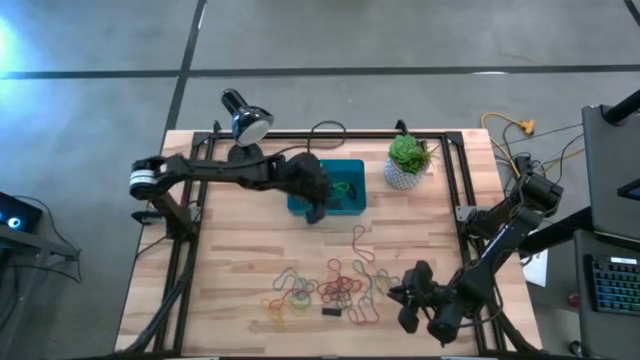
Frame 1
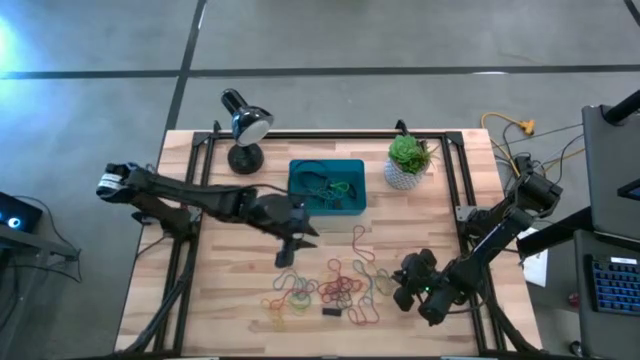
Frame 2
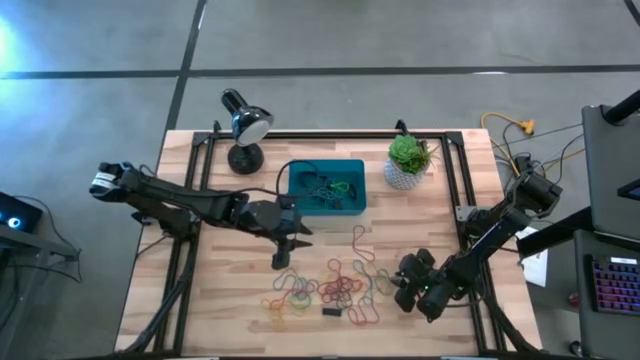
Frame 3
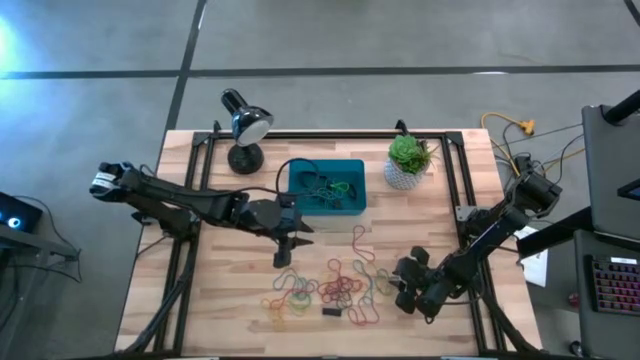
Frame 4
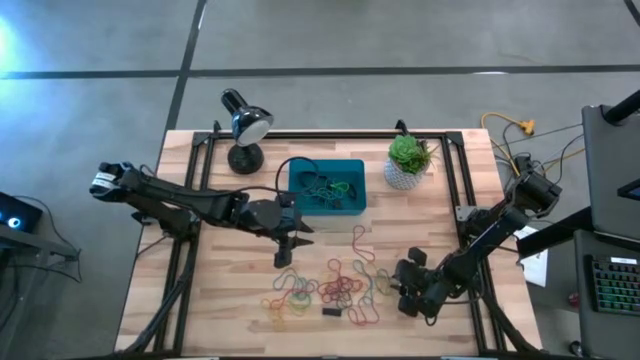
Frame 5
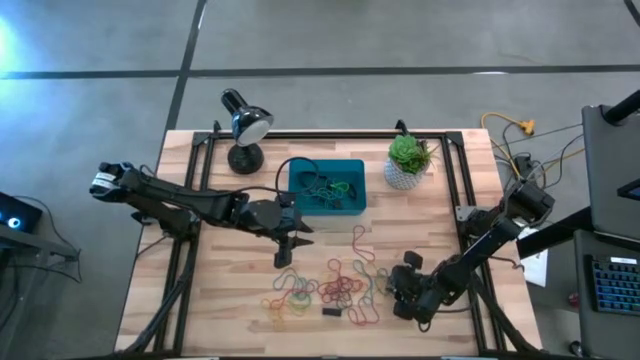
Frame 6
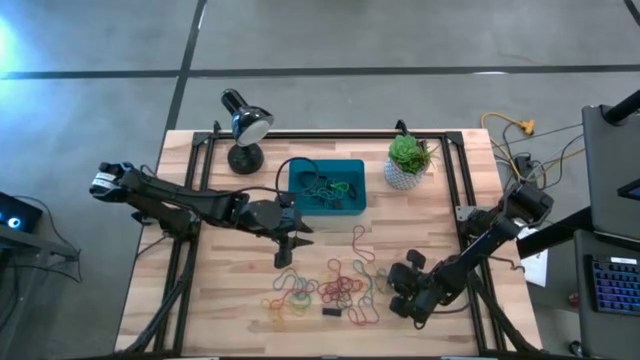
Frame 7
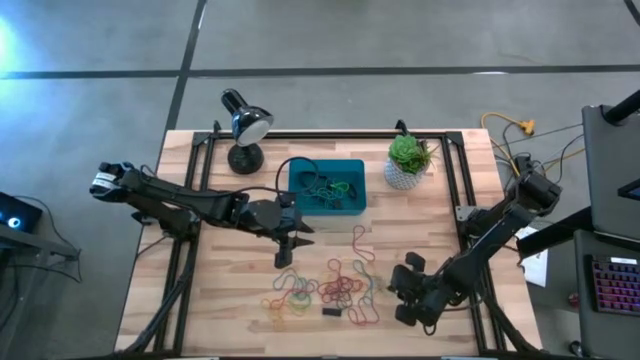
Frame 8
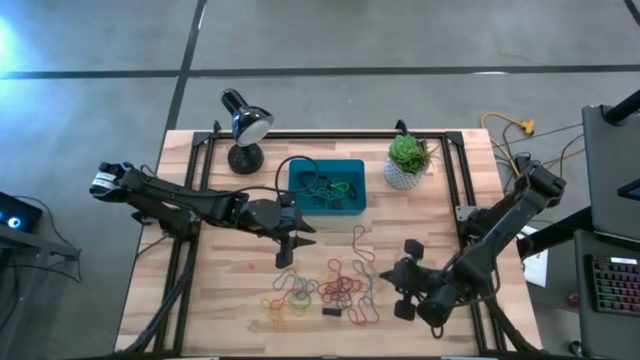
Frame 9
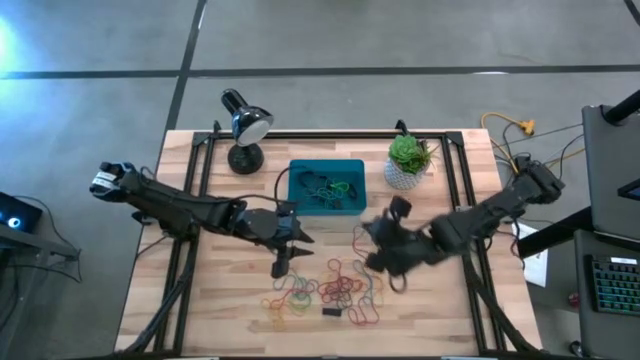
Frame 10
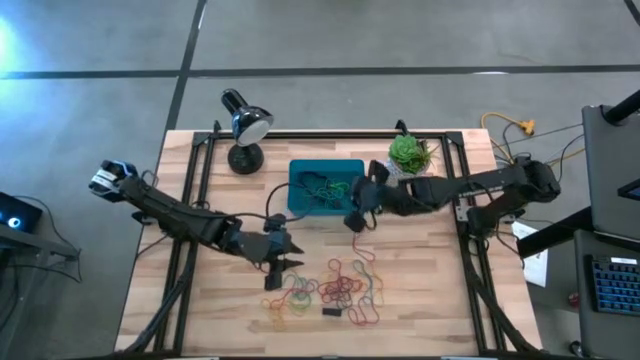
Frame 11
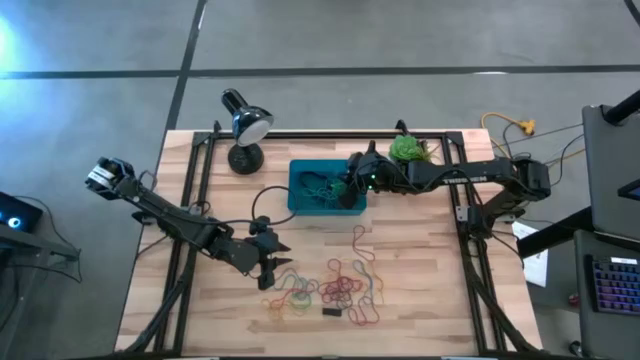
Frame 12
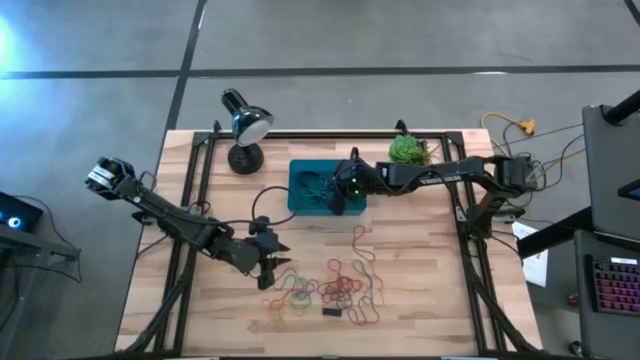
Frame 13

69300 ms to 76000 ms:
Task: Pick and place rubber bands into bin
Put the blue rubber band into the blue transparent bin

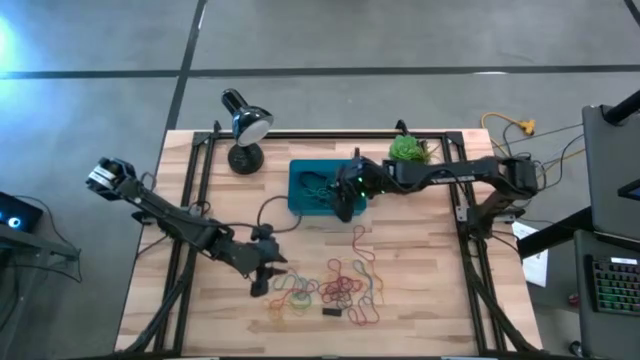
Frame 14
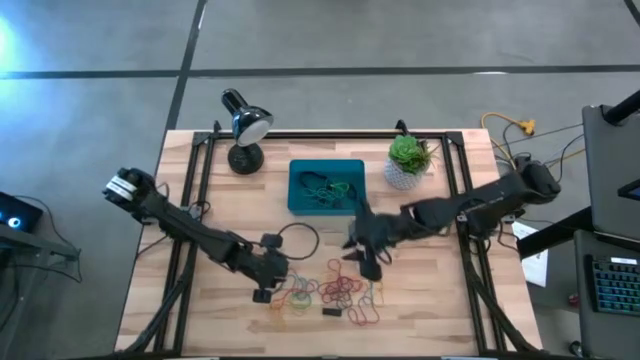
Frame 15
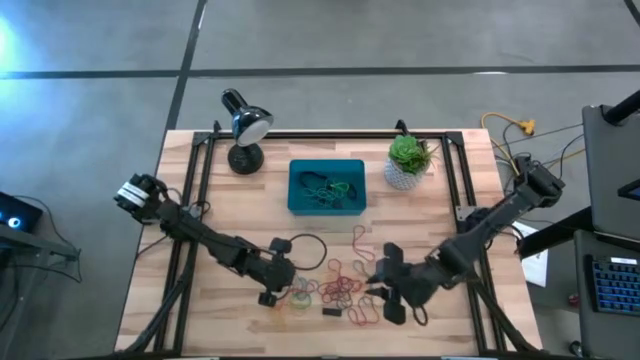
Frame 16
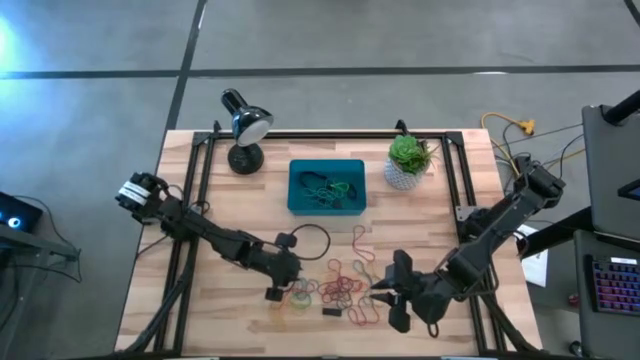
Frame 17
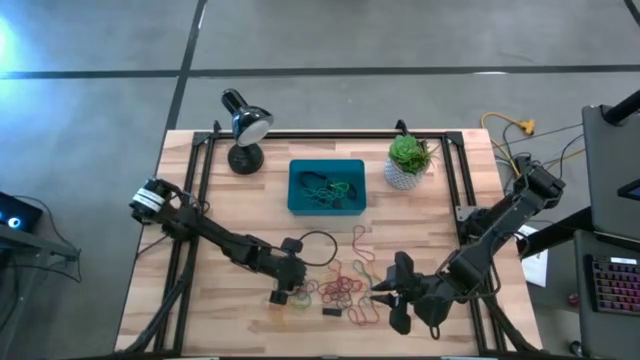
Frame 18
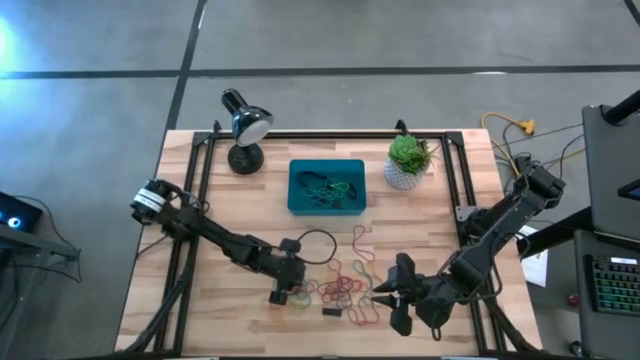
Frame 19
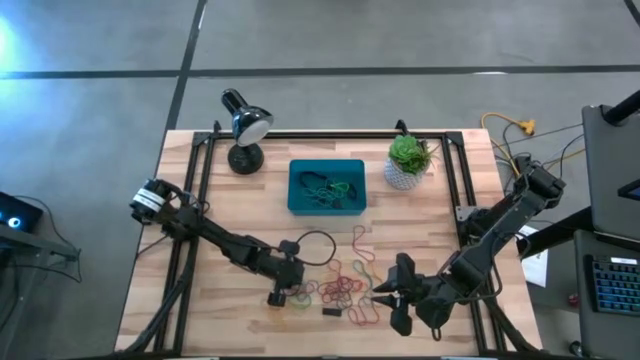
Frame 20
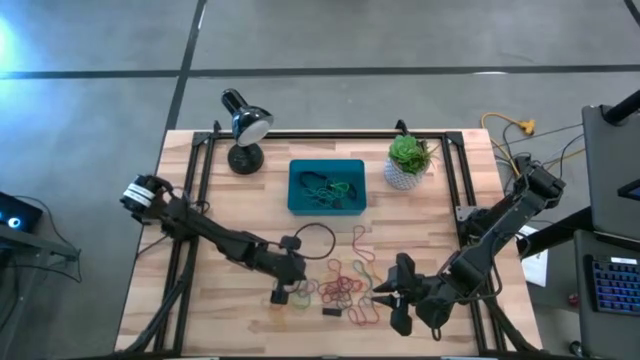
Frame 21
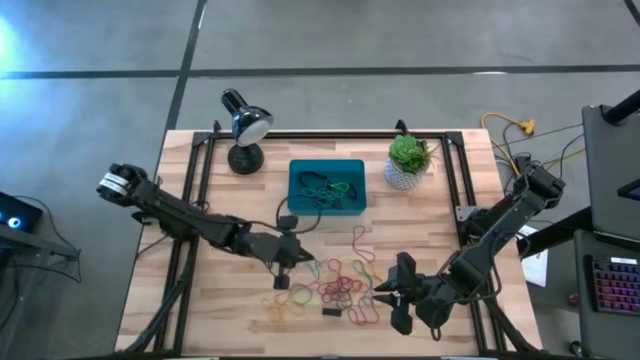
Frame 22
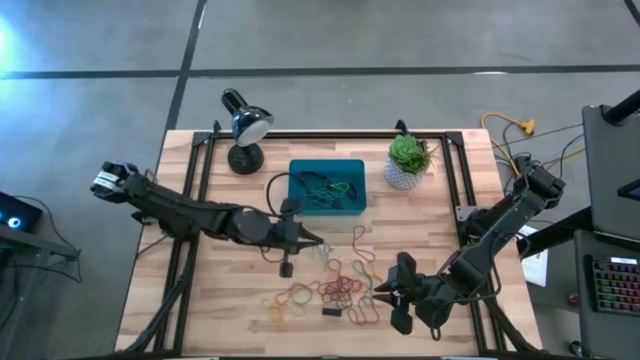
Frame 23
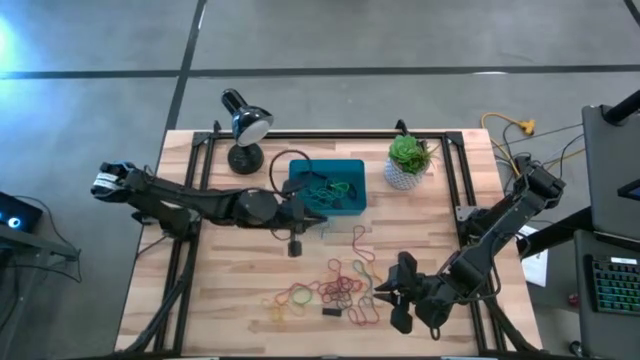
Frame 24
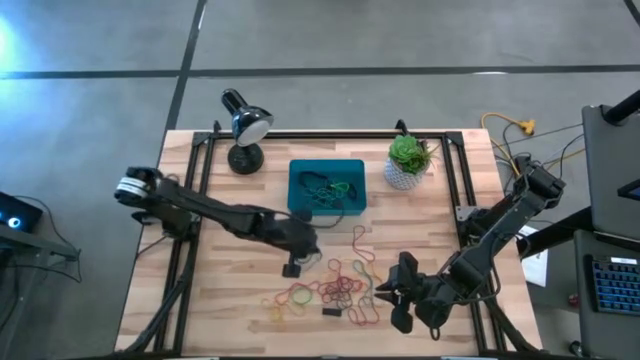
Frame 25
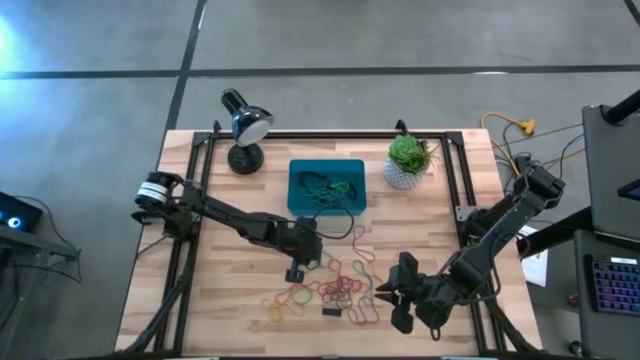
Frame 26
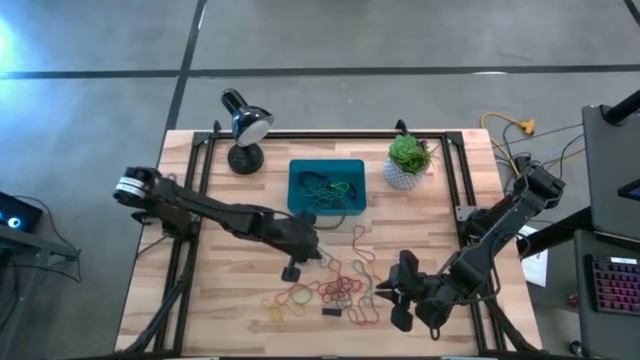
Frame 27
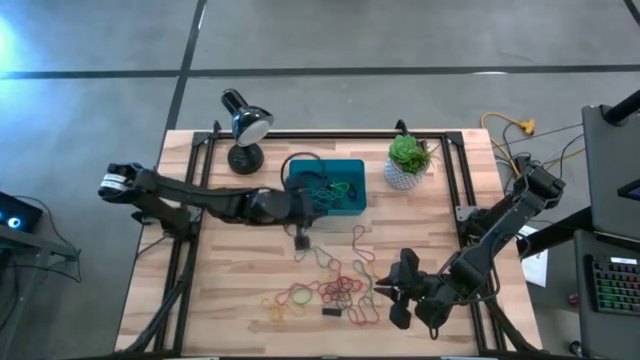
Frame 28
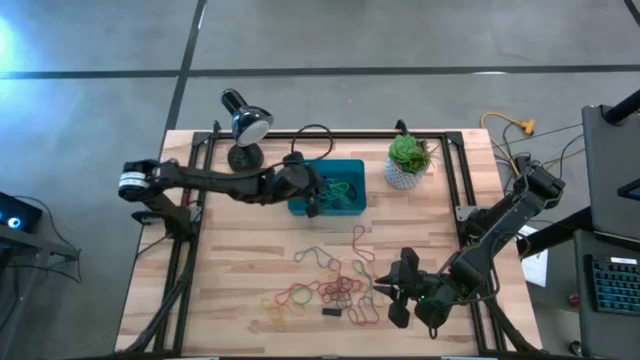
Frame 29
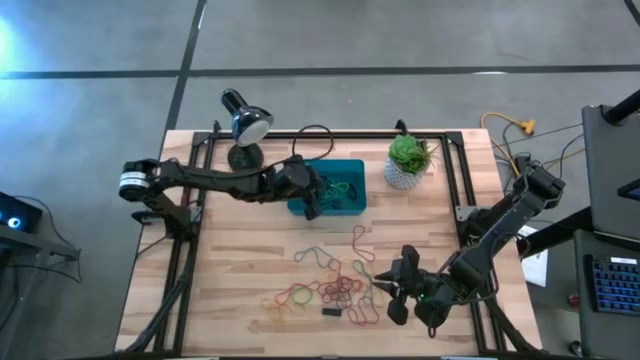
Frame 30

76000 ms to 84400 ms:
Put the right blue rubber band into the dark blue bin

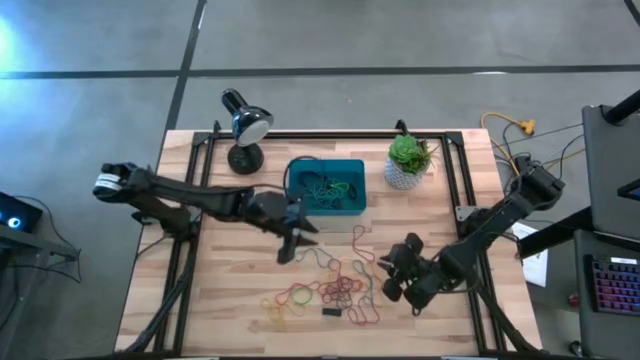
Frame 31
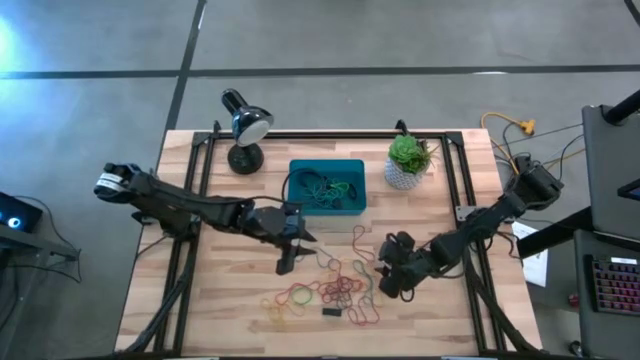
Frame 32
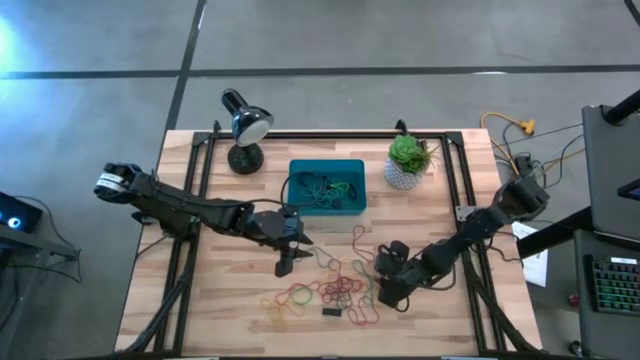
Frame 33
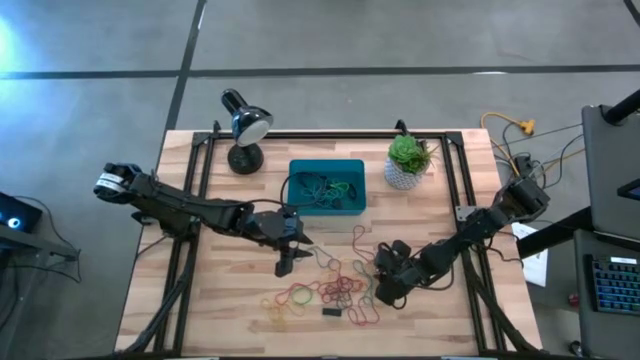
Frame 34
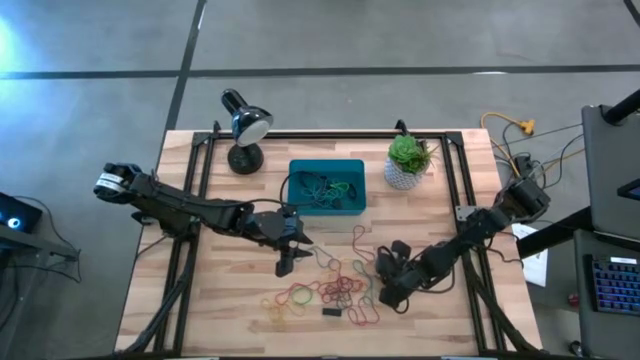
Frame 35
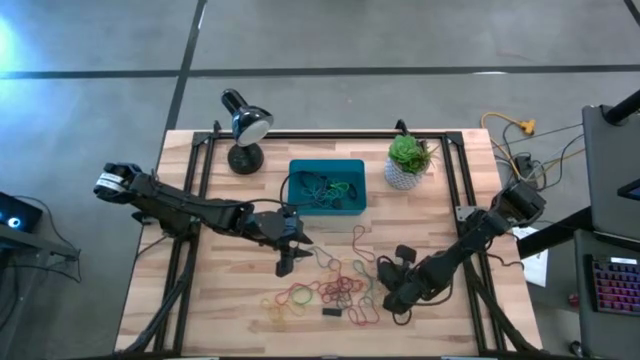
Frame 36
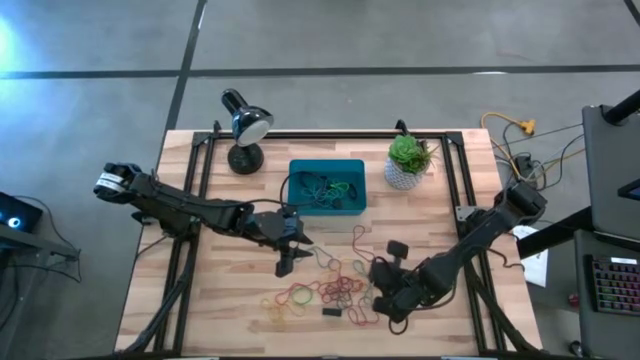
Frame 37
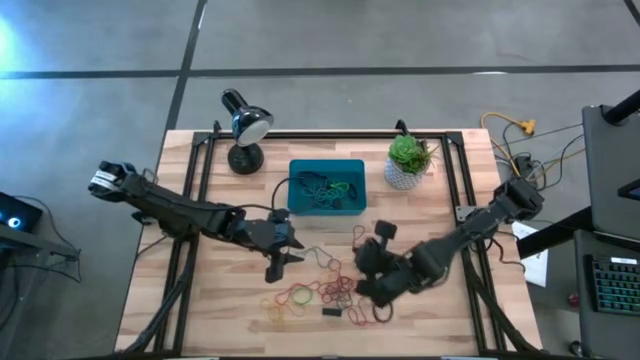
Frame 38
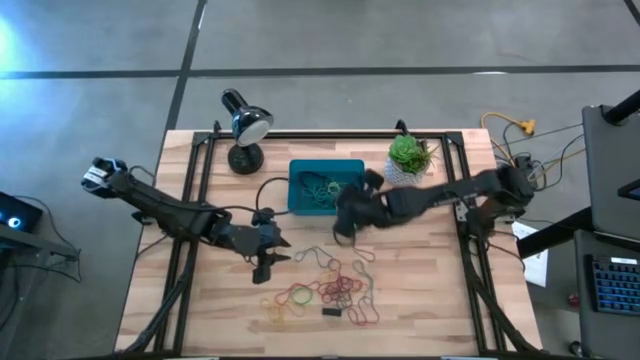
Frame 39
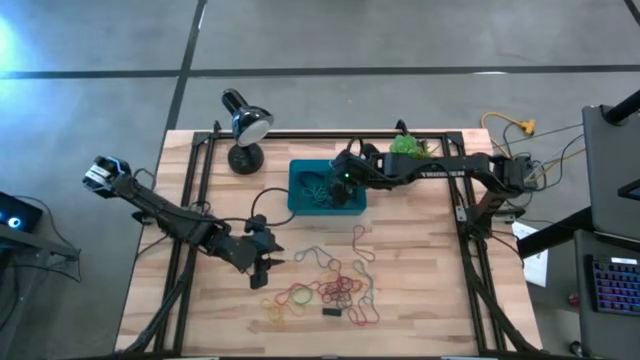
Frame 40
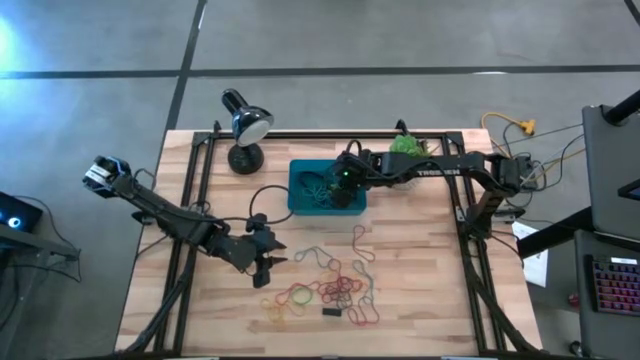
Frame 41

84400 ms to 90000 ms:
Put the yellow rubber band into the dark blue bin
